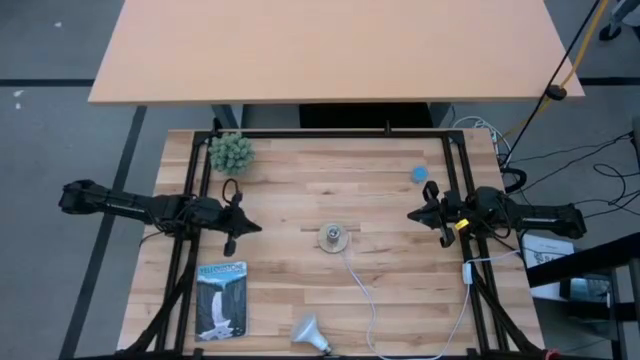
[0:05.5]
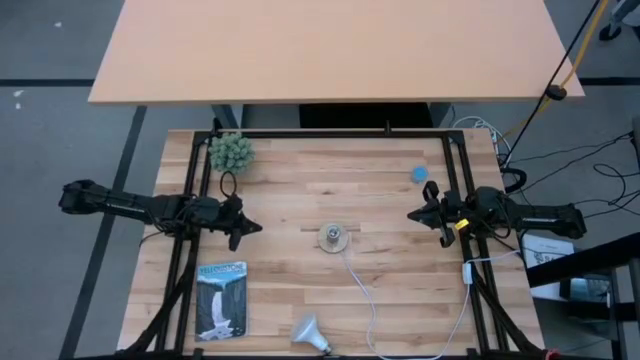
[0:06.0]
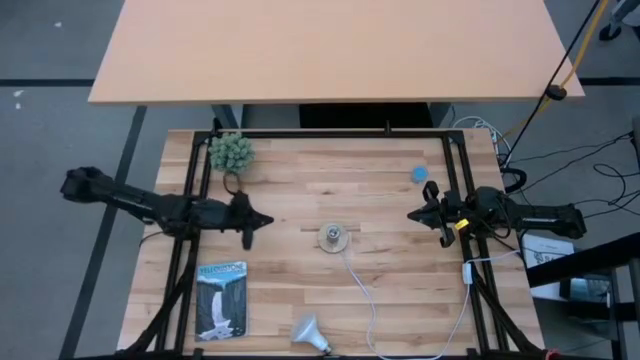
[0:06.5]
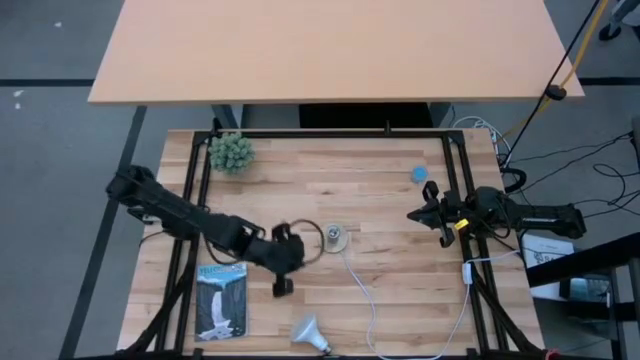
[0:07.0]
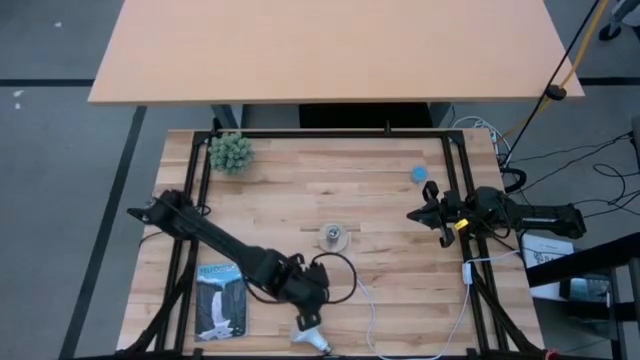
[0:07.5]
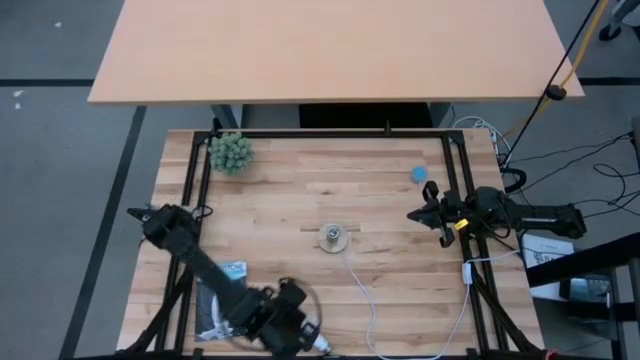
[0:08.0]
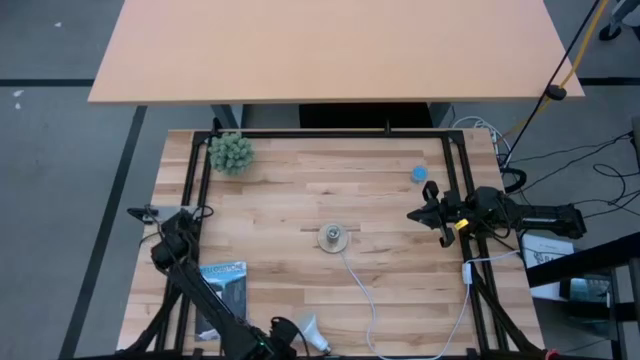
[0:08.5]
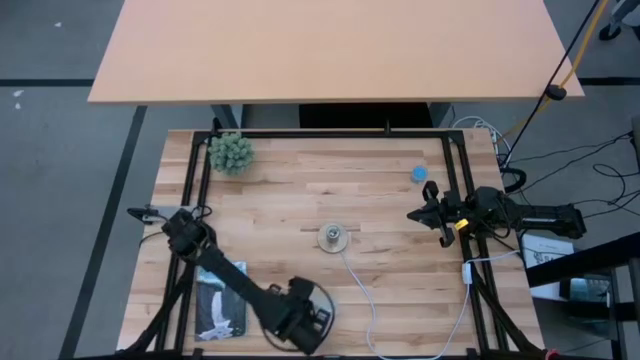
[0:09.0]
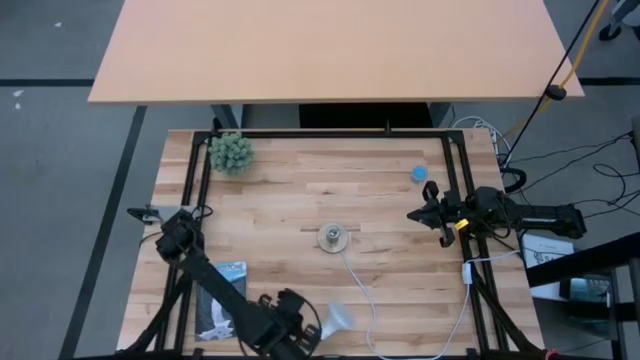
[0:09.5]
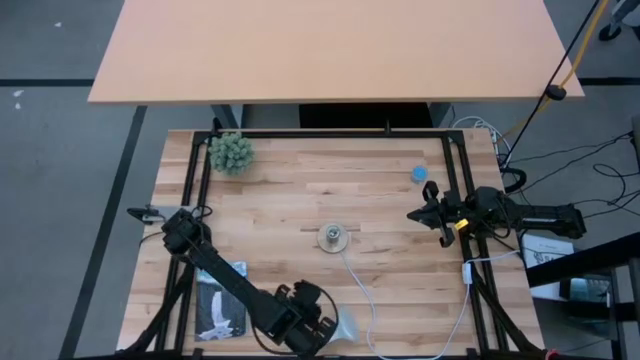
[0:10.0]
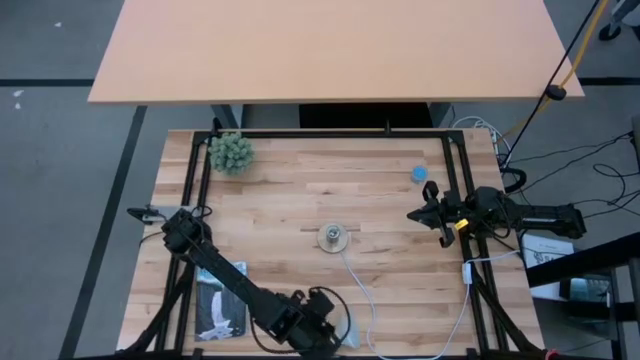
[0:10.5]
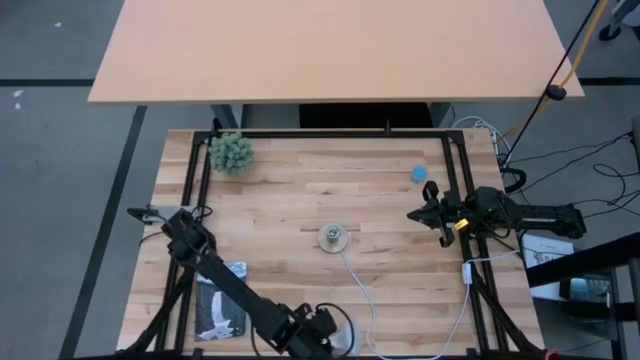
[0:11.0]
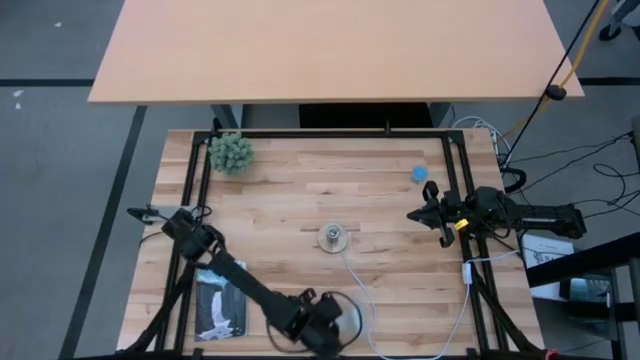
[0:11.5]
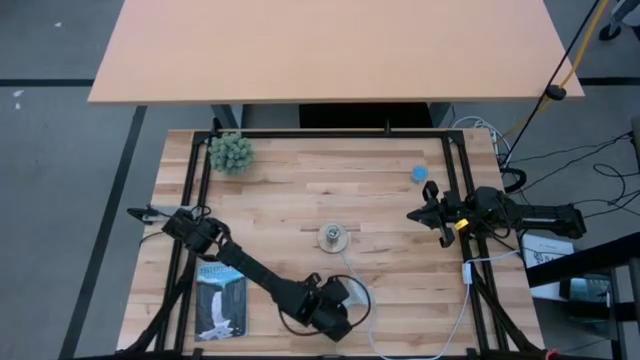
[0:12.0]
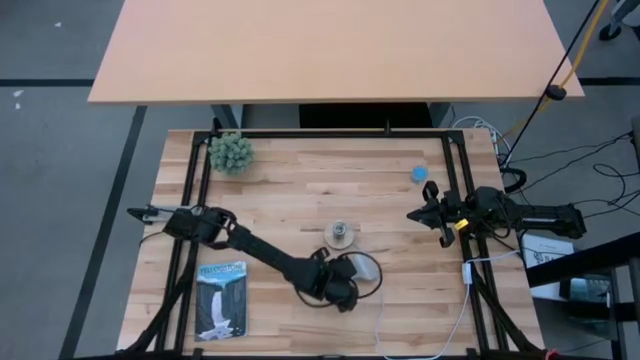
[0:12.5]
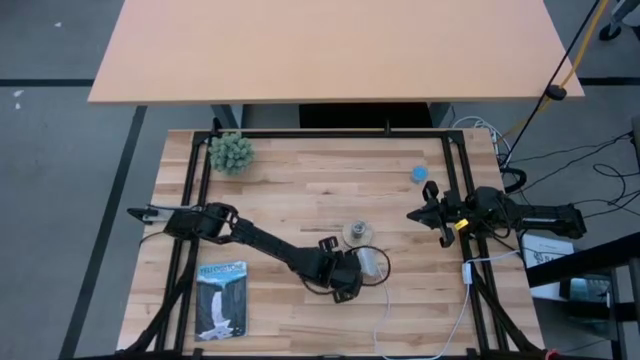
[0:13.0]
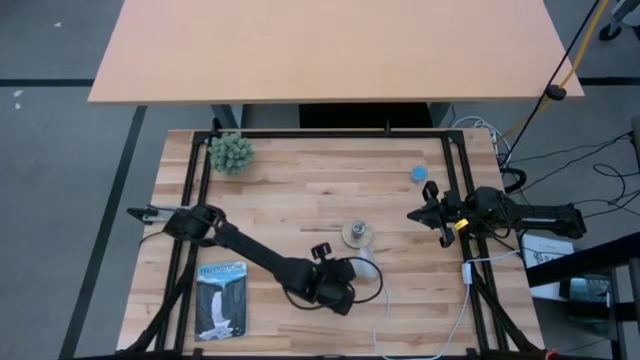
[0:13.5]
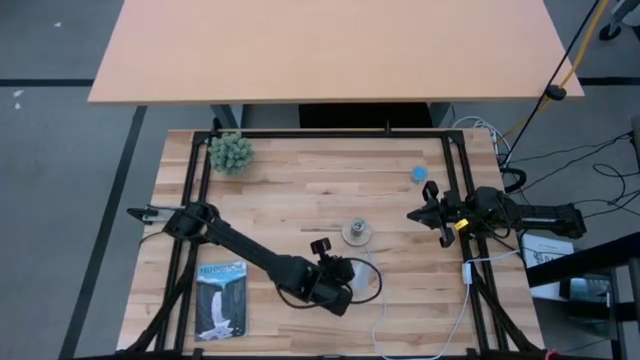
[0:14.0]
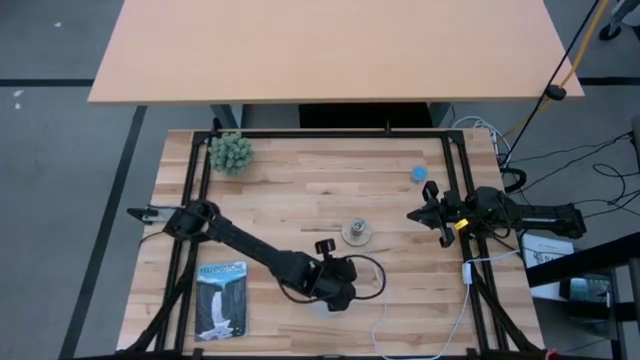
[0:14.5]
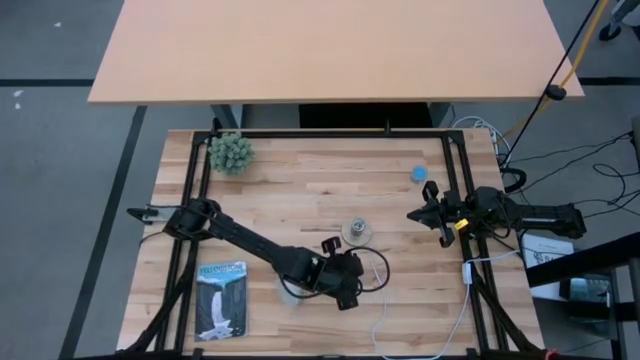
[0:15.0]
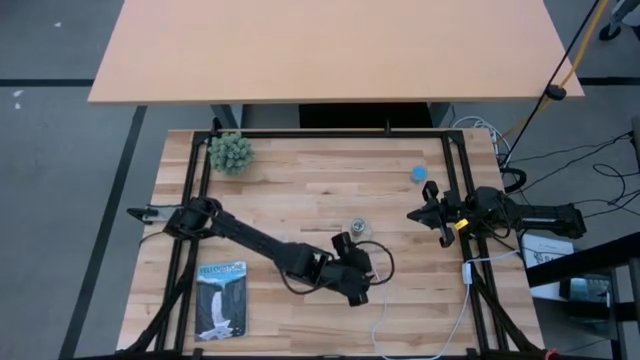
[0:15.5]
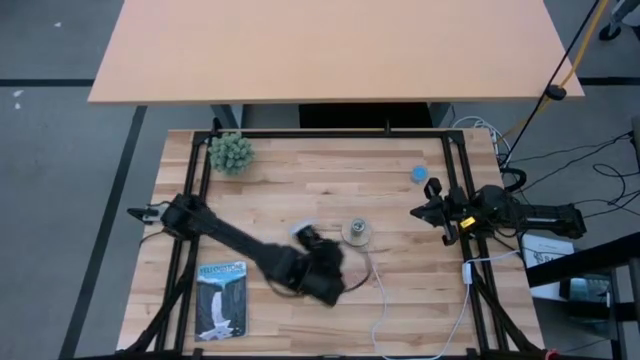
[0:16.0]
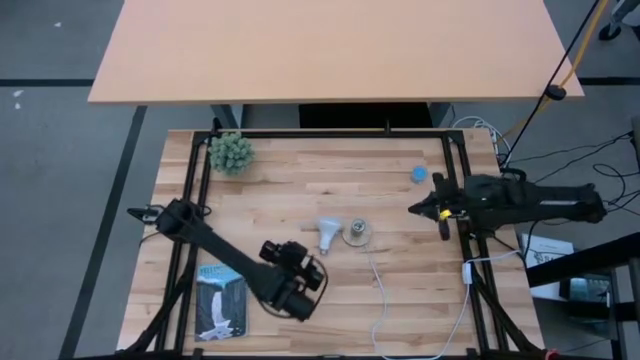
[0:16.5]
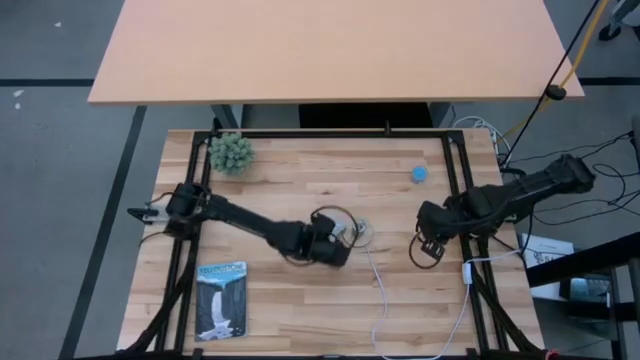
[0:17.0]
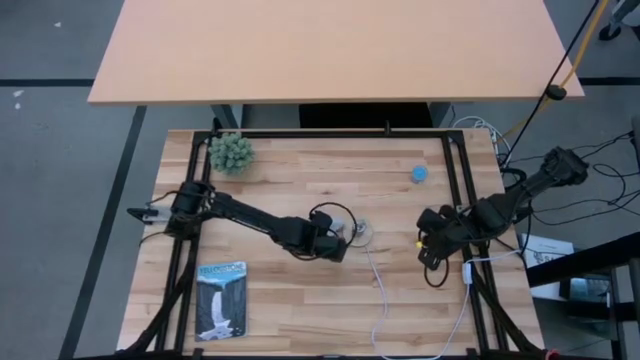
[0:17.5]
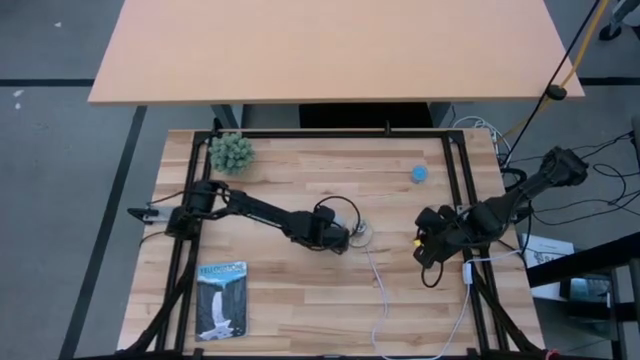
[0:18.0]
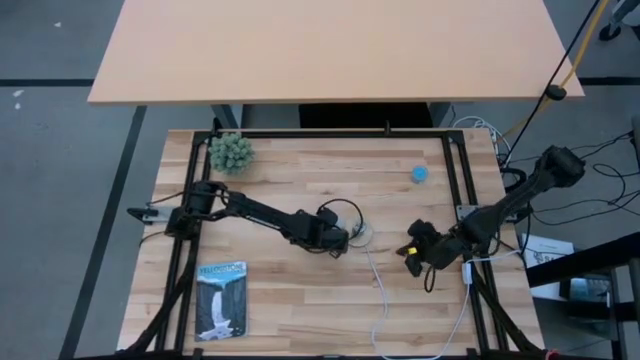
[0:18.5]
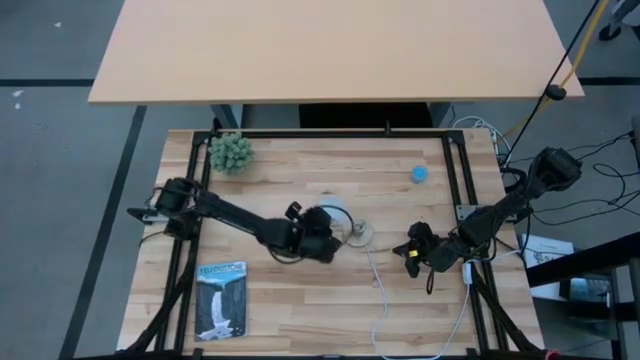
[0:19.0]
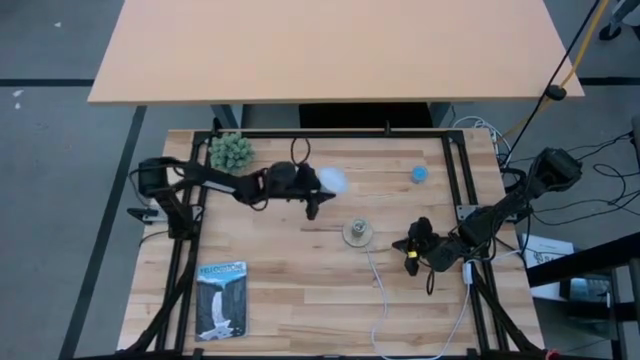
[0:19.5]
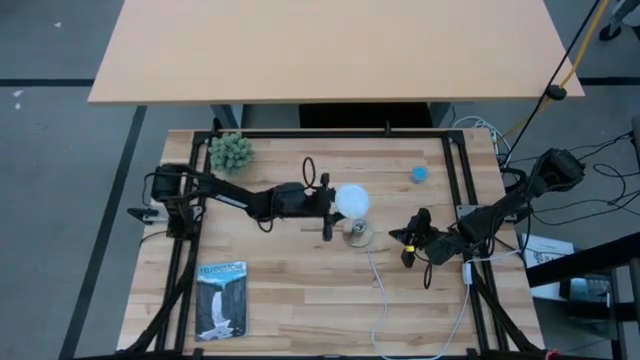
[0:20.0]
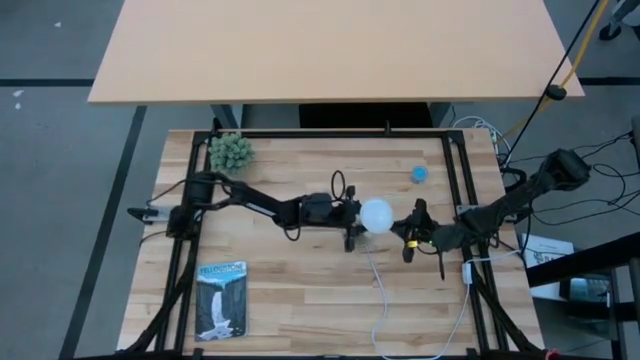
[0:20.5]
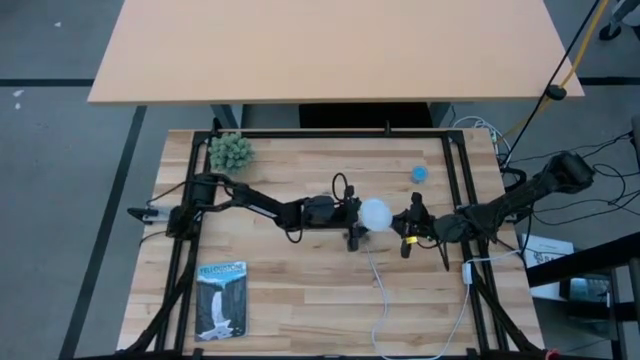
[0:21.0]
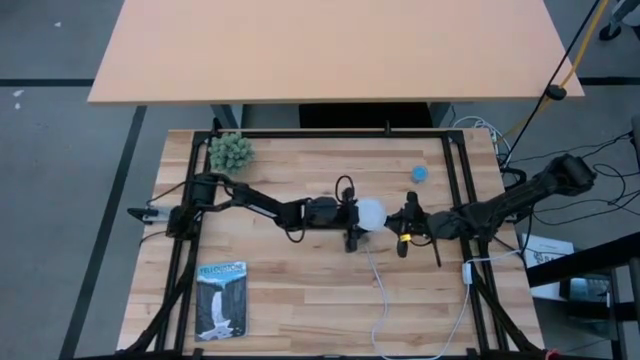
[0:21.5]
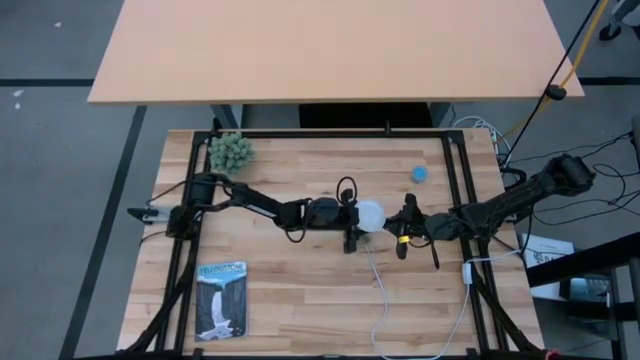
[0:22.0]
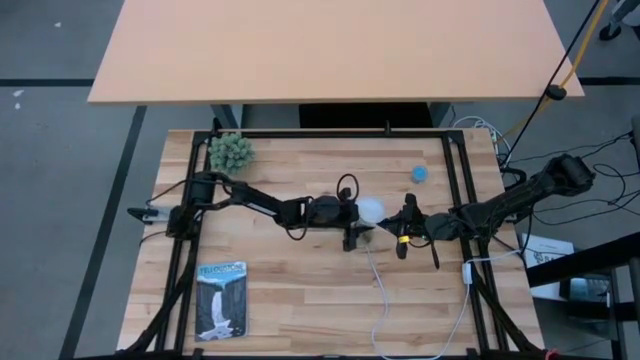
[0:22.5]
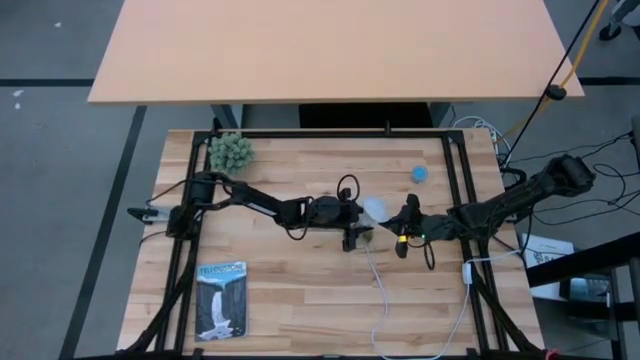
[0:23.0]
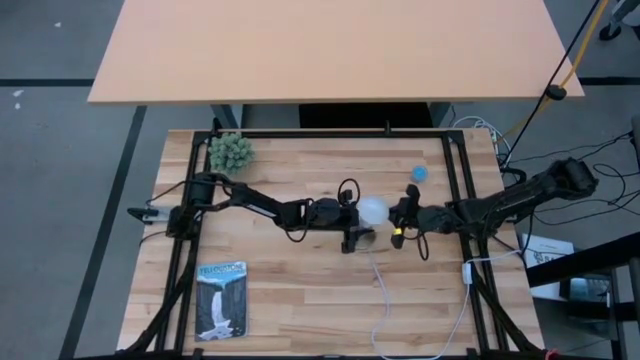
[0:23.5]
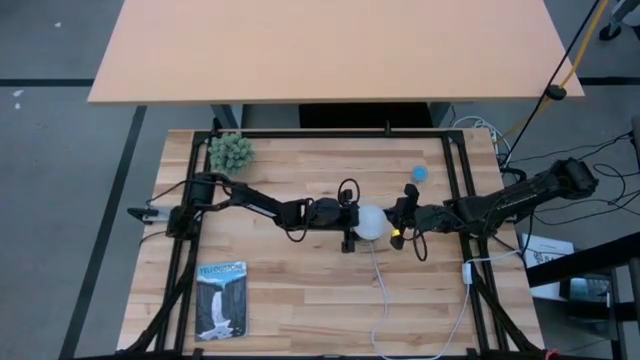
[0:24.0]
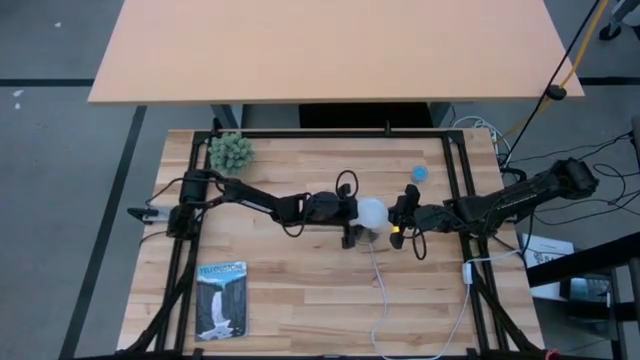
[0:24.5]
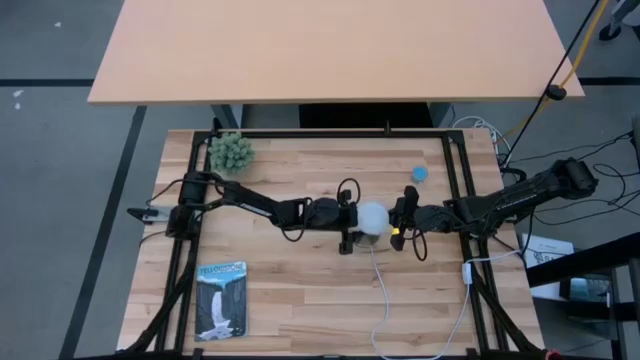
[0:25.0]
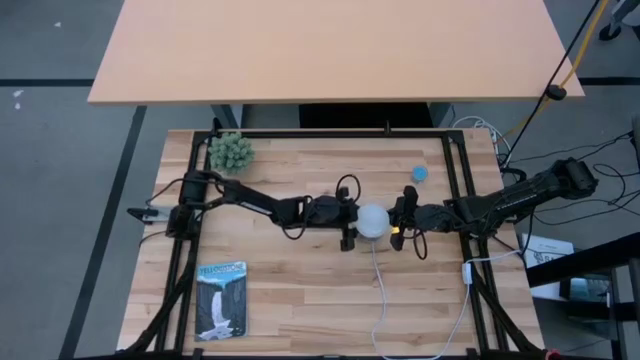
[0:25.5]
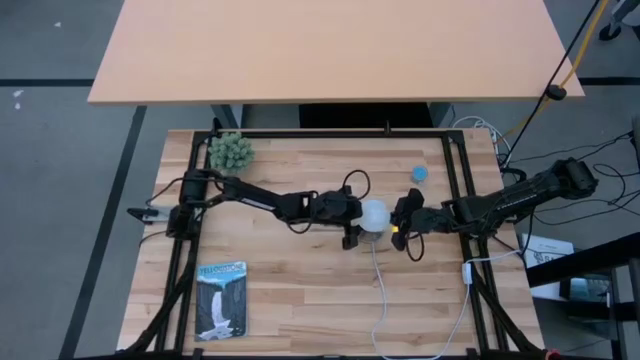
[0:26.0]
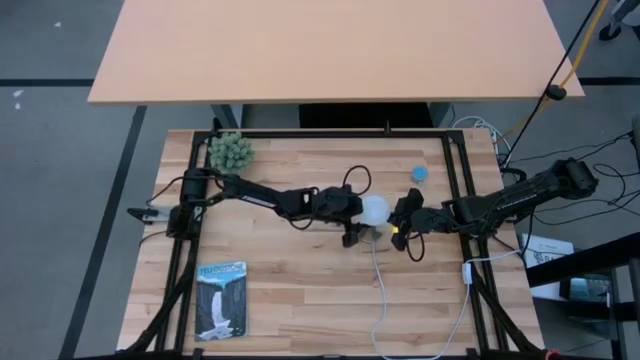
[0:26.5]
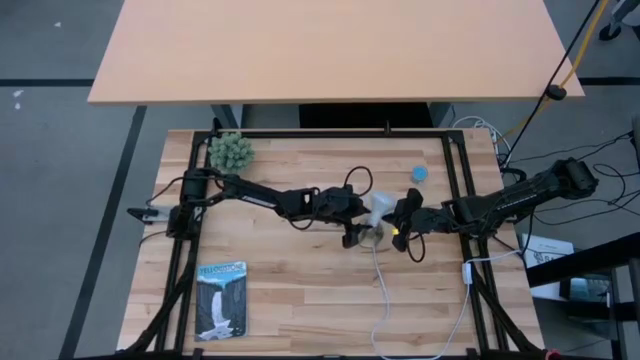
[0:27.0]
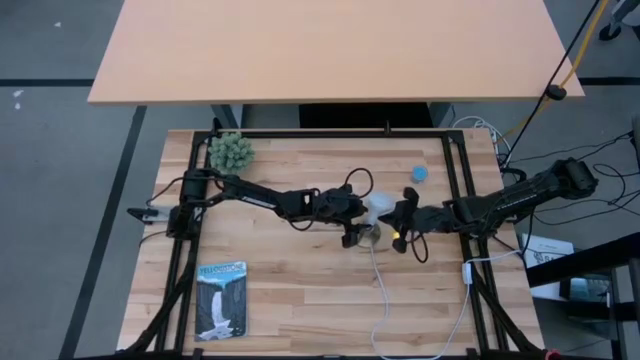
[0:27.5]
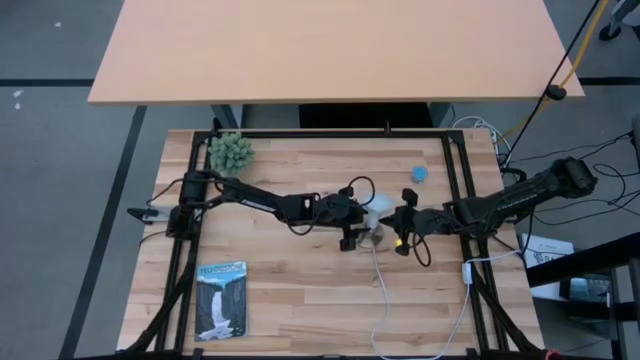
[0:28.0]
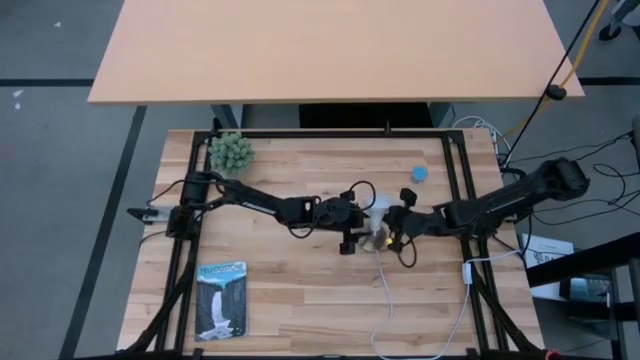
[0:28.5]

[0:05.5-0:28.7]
Task: Screw lightbulb
Insert the white lightbulb into the lamp
